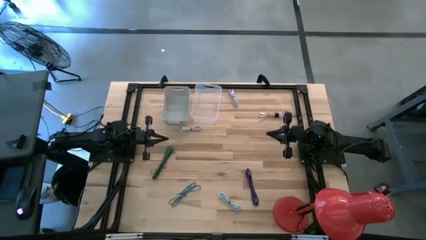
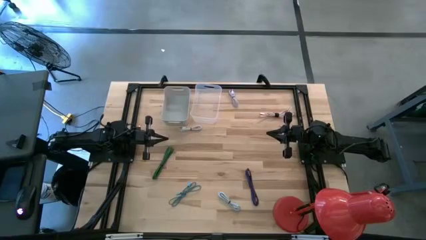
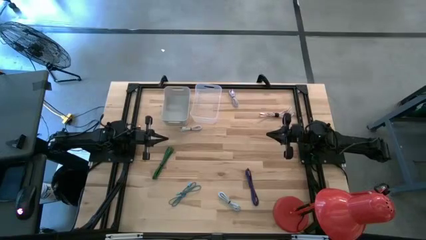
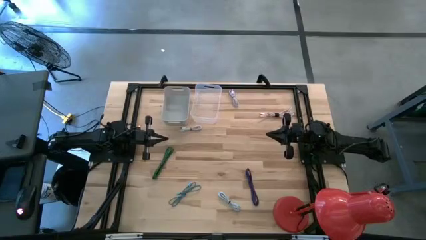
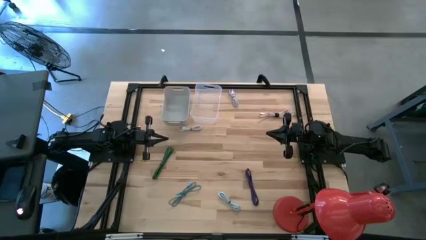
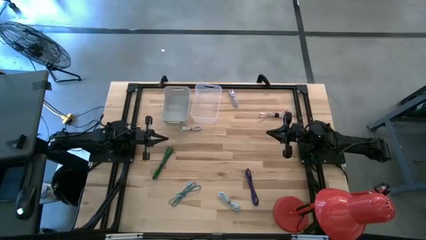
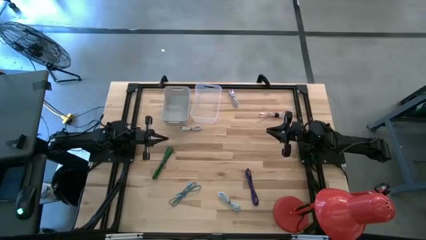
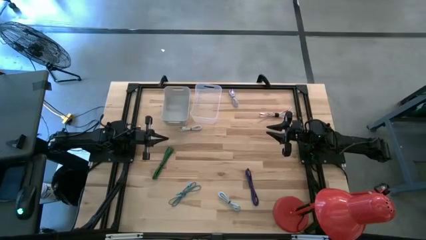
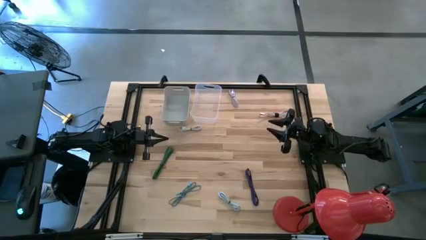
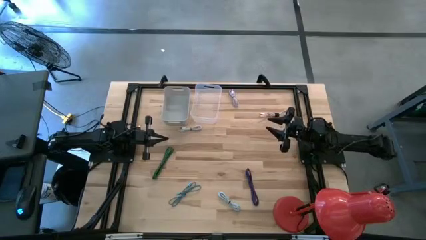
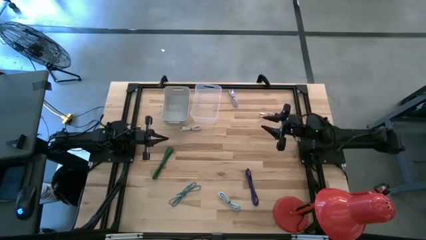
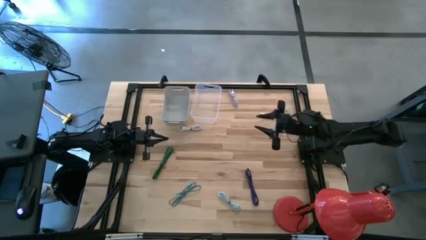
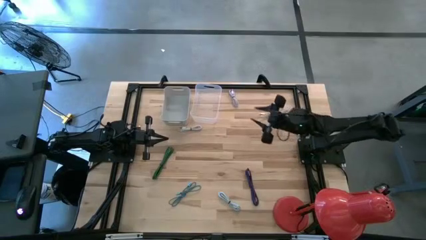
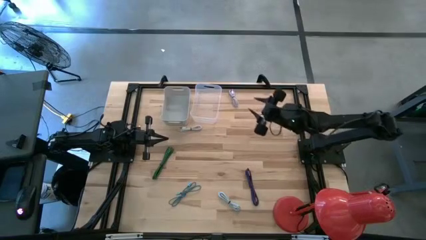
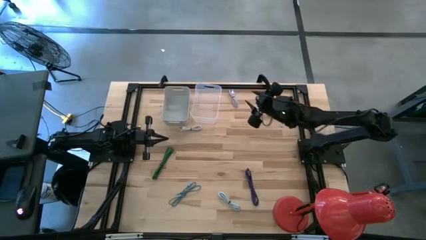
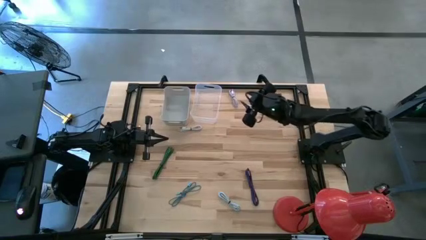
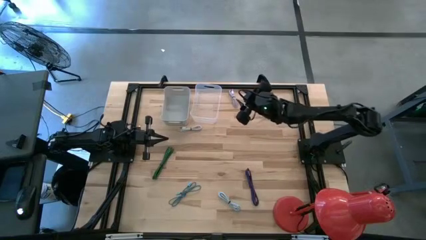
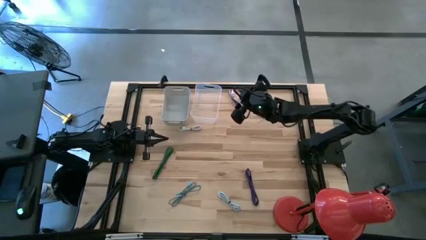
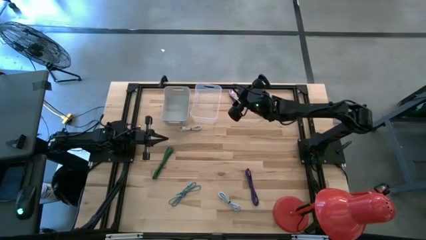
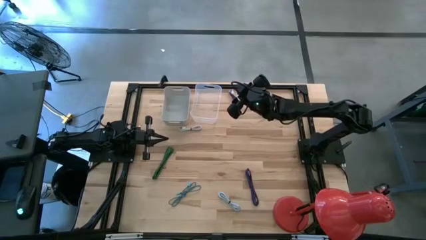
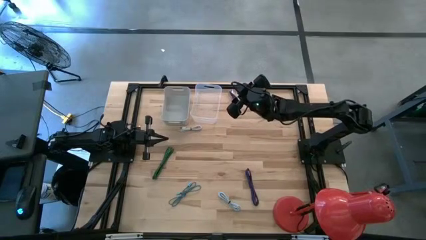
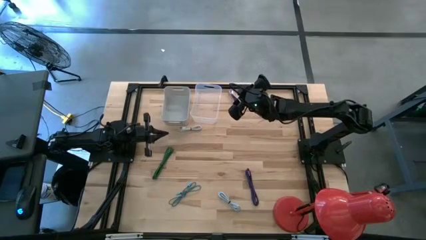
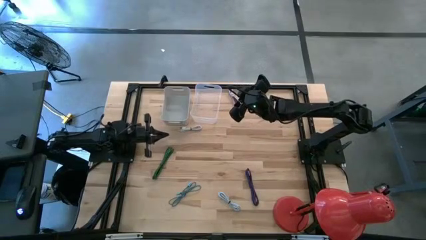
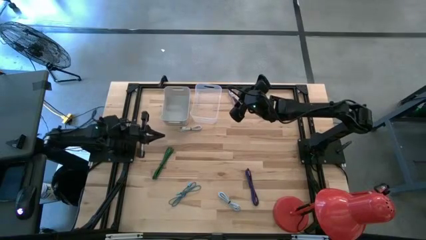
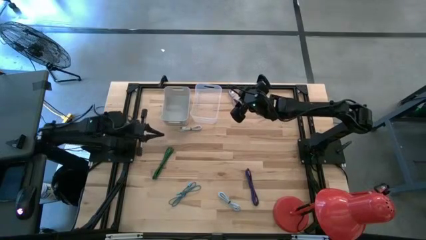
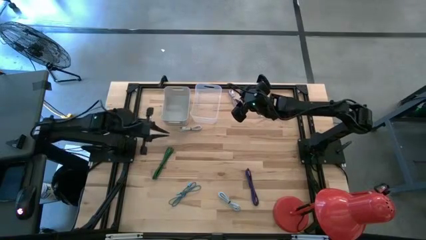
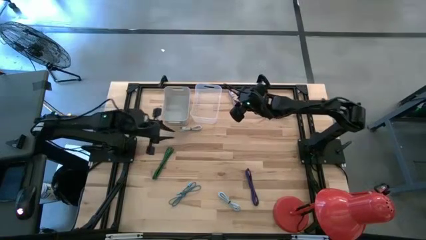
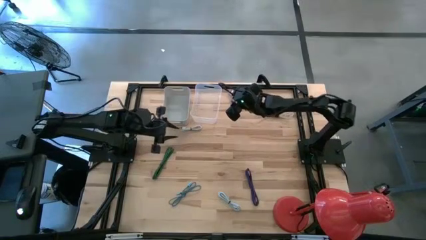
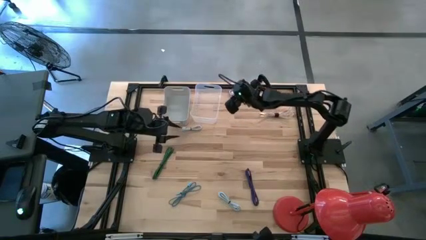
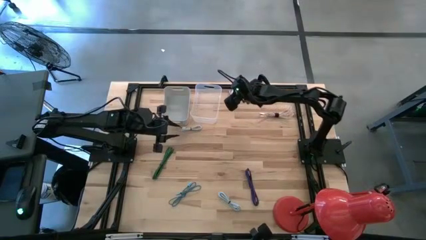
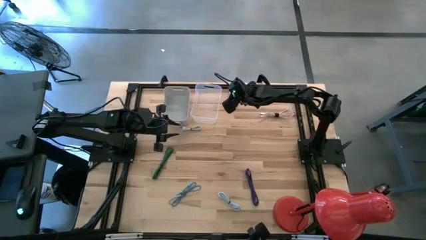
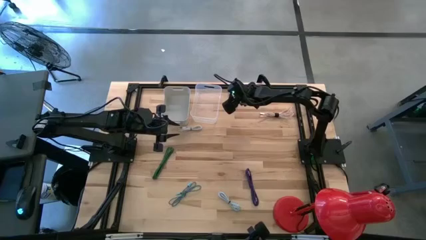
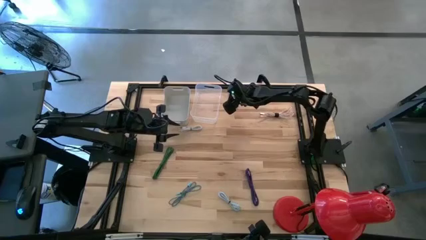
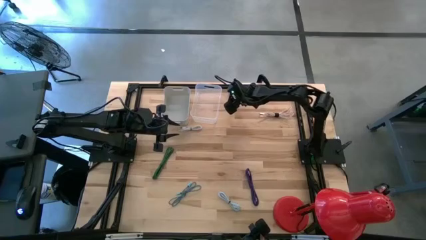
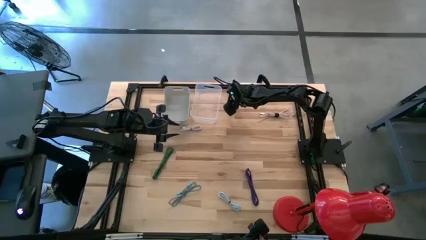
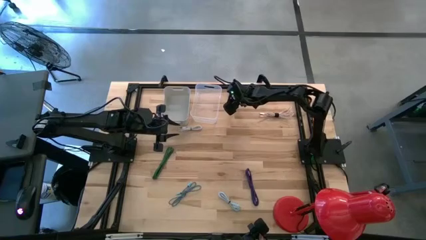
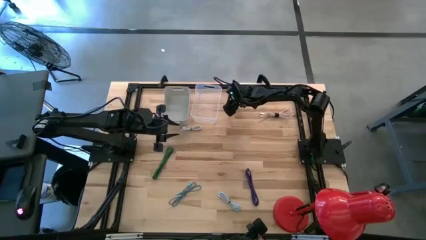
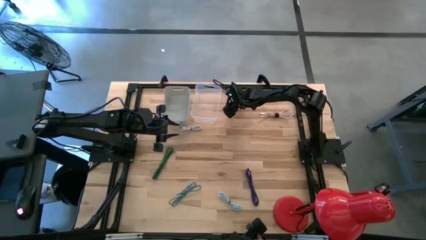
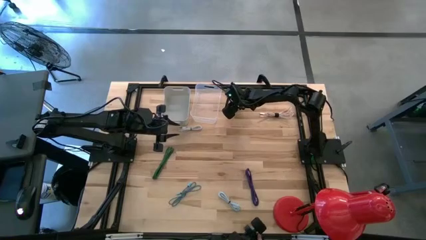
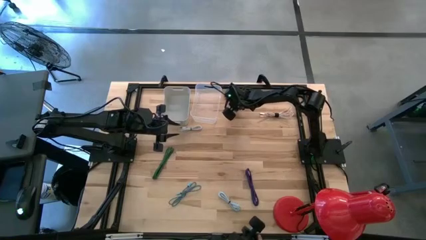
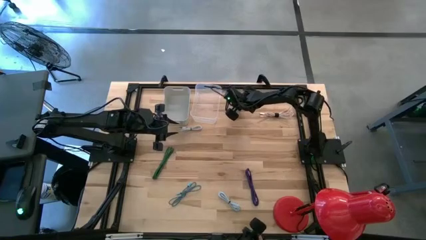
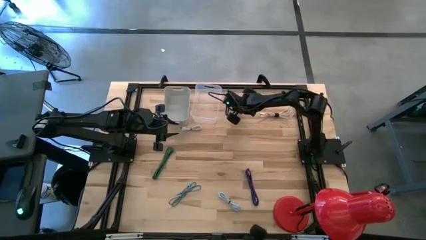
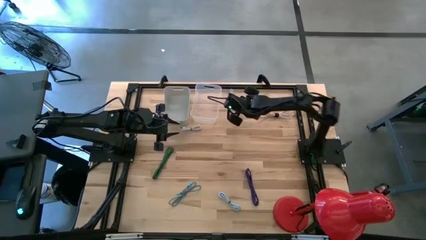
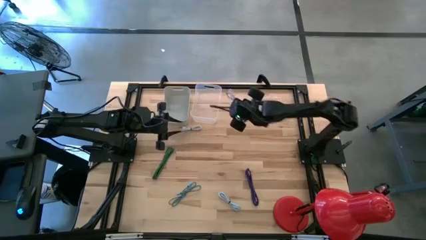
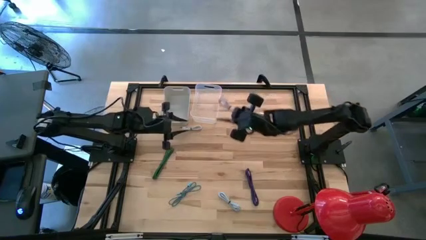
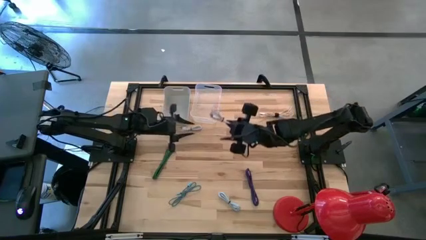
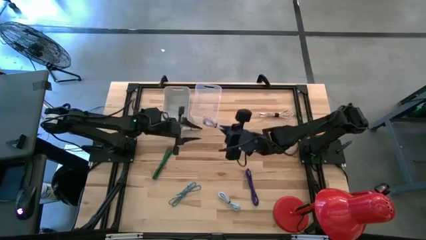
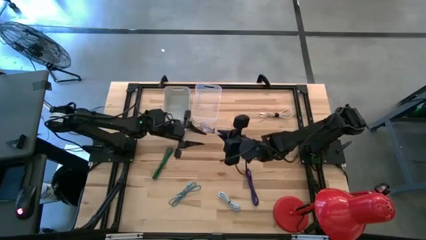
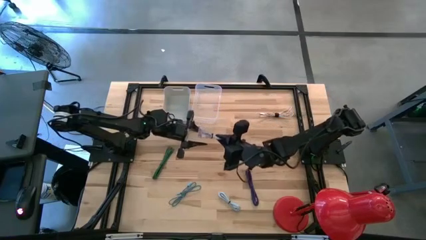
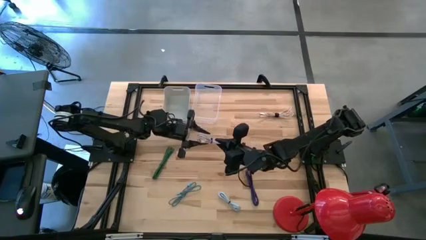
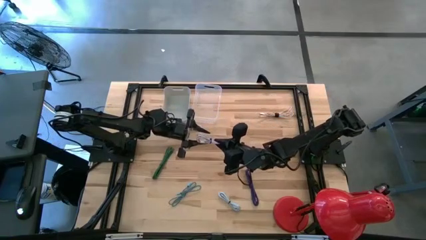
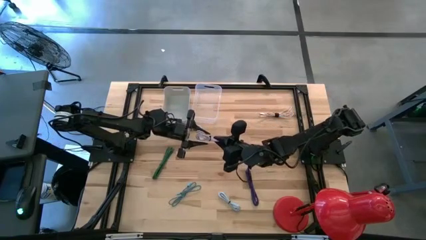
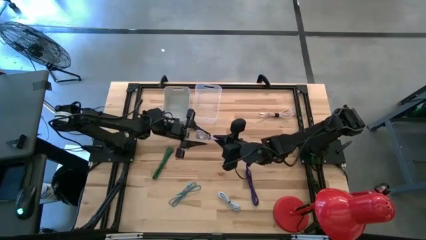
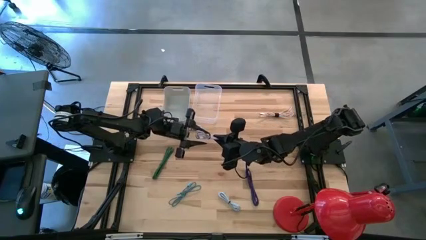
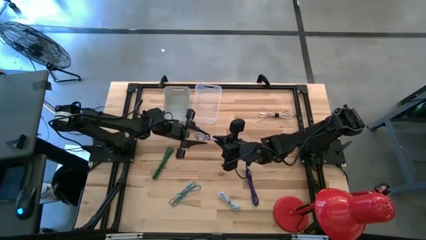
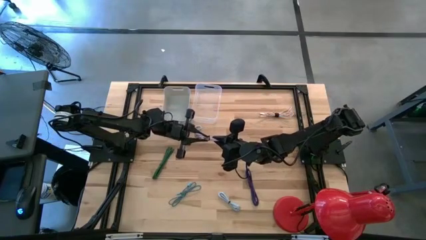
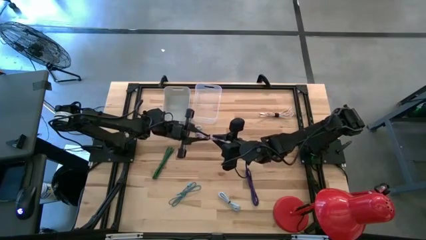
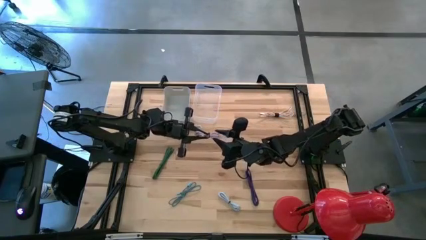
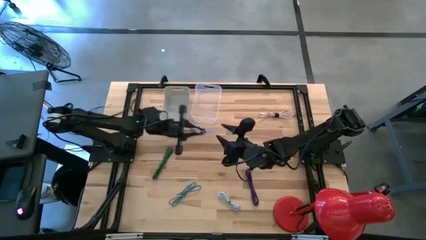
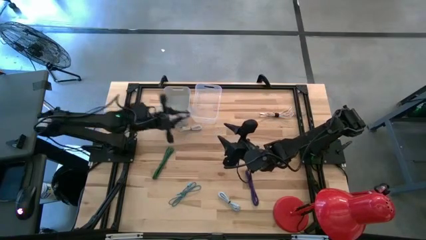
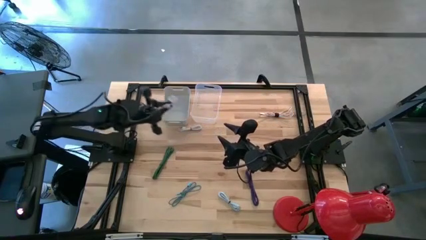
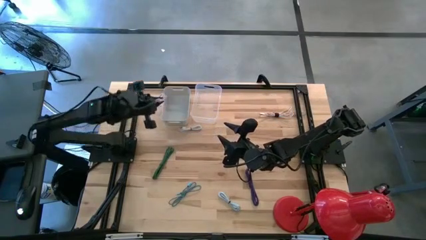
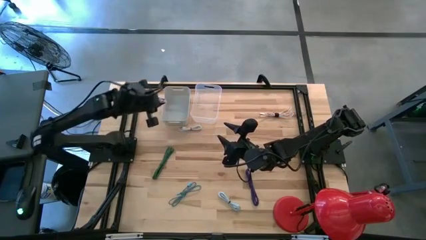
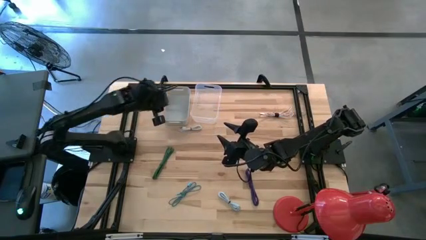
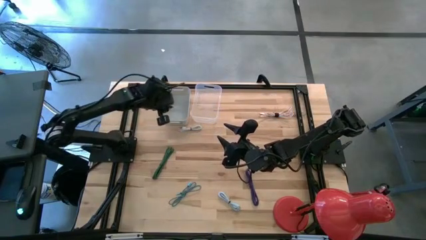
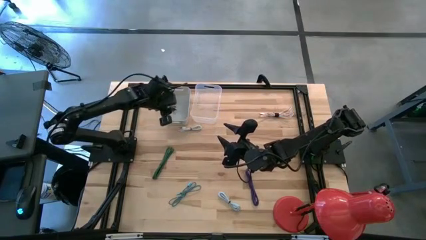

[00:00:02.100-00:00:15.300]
Task: Pick & Place USB Port
Put the purple charger cable into the gray bin

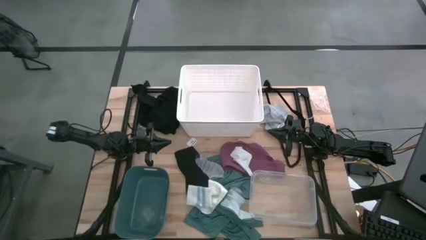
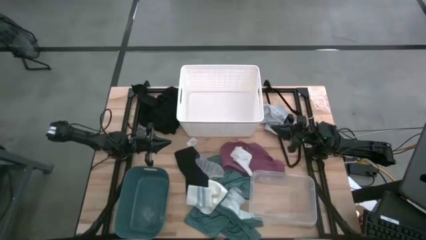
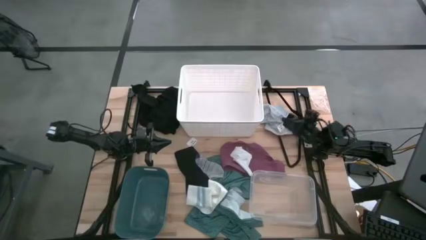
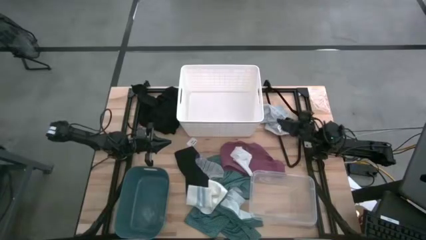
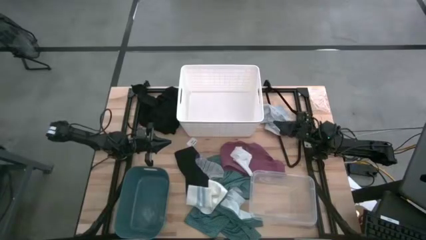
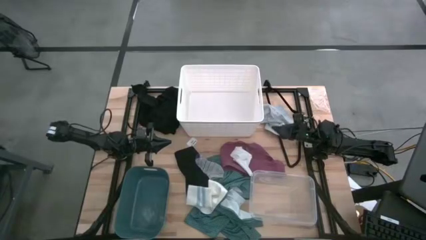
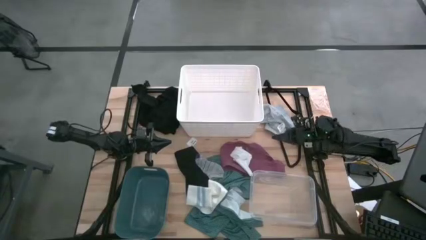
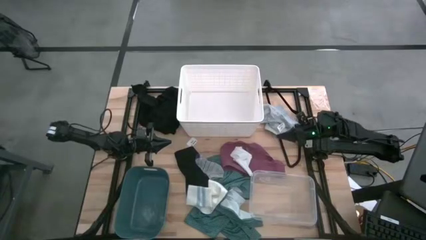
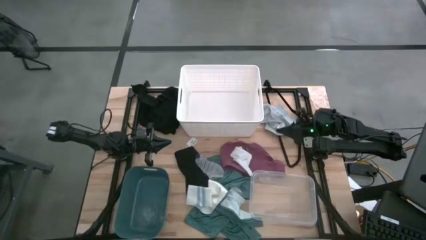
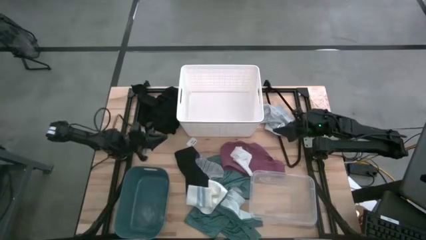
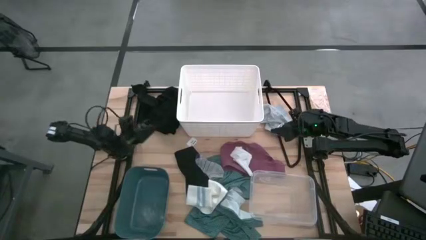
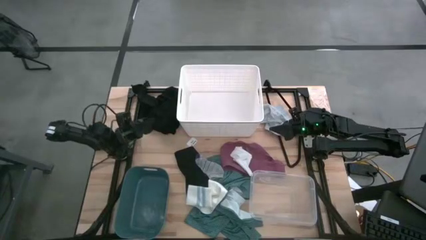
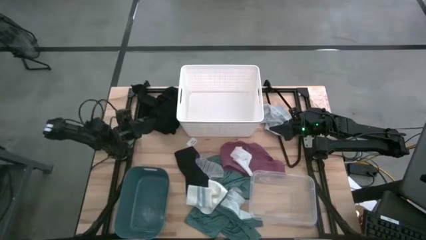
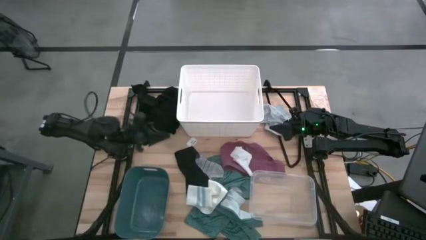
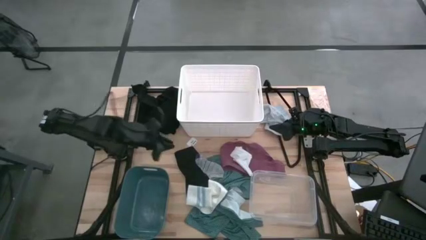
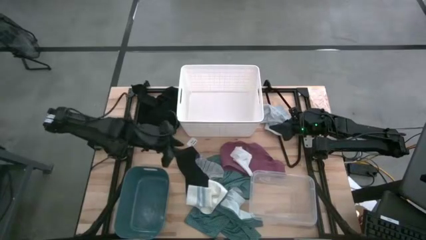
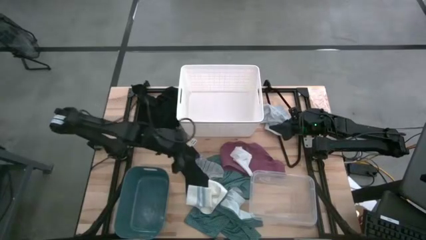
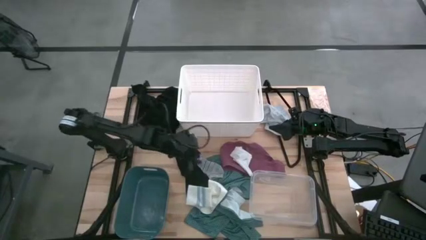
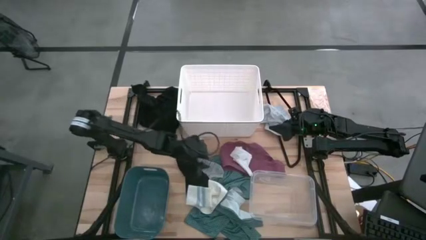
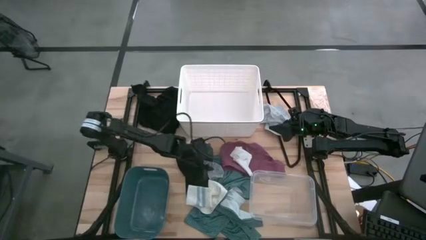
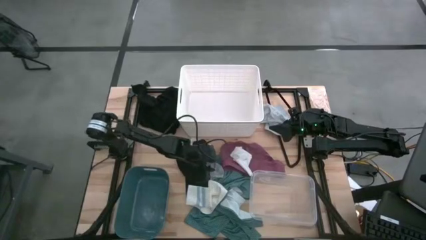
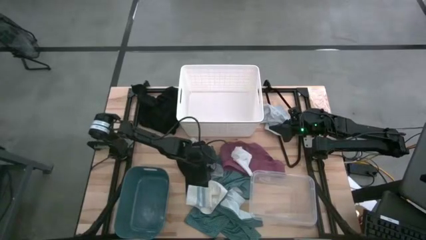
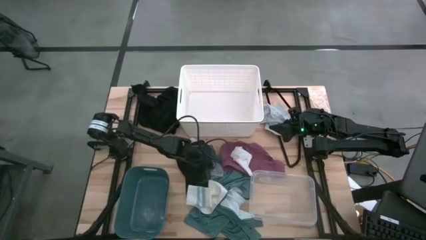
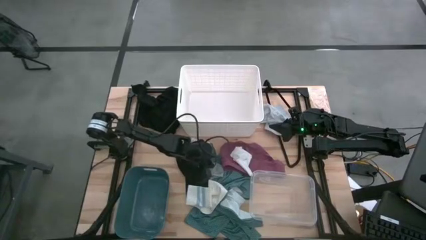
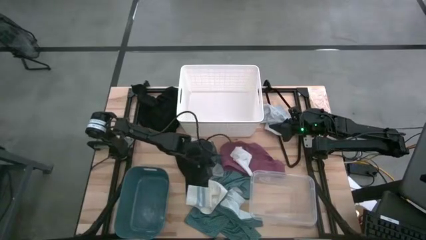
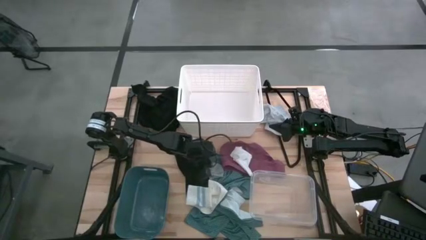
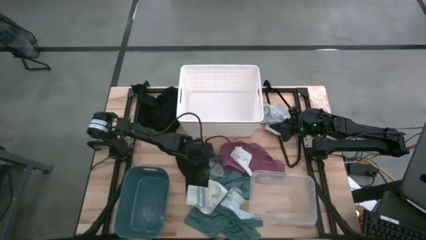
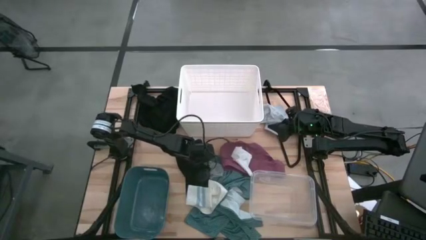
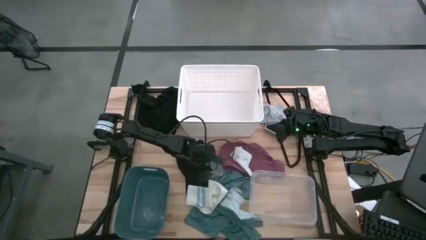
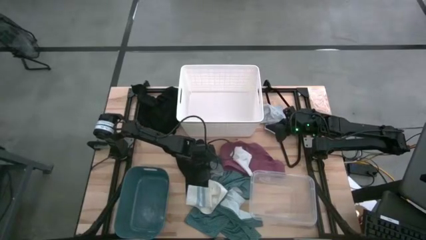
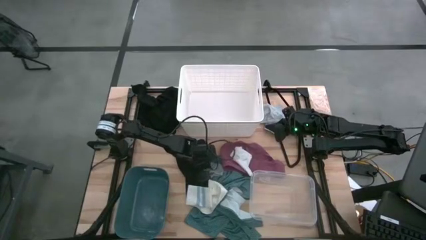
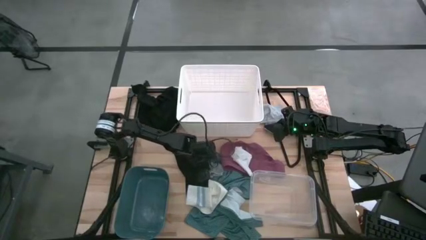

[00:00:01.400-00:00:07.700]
Task: Pick & Place Cloths
Put the gray striped sock into the blue bin
